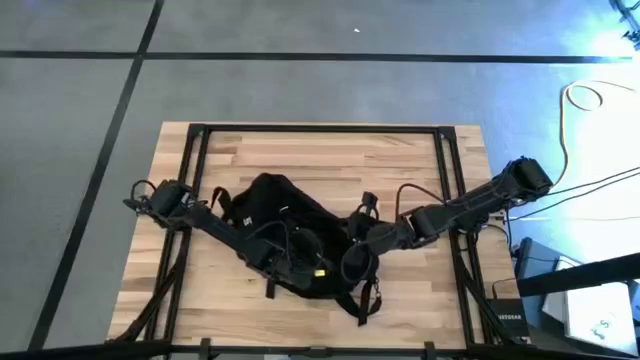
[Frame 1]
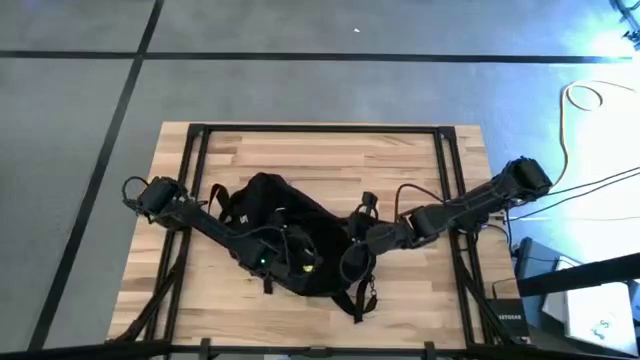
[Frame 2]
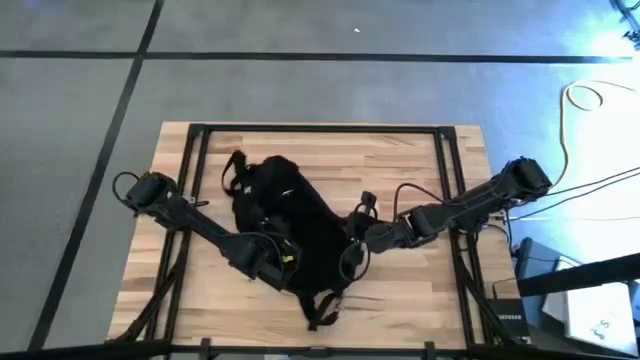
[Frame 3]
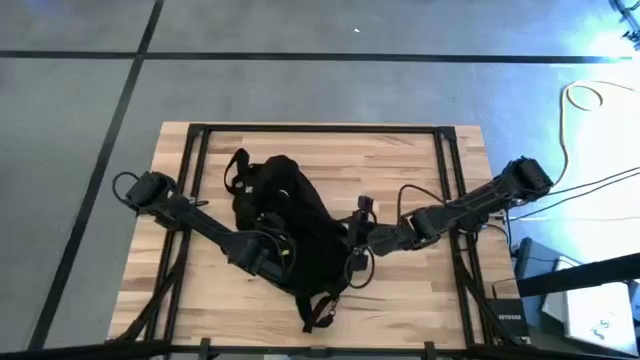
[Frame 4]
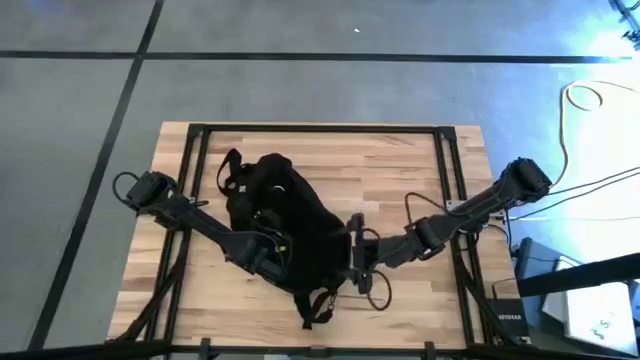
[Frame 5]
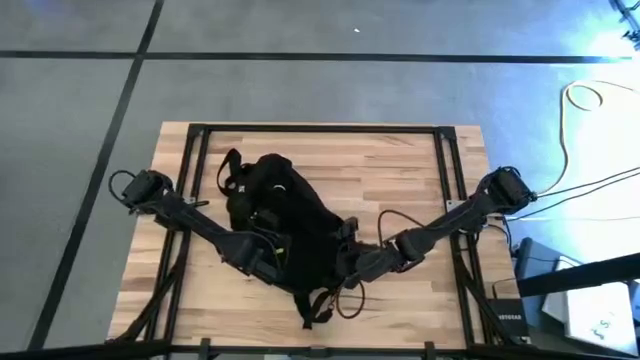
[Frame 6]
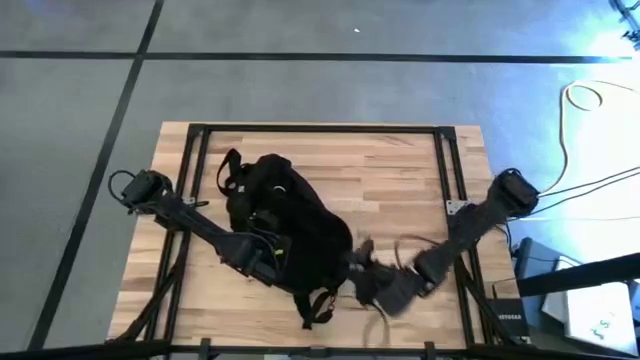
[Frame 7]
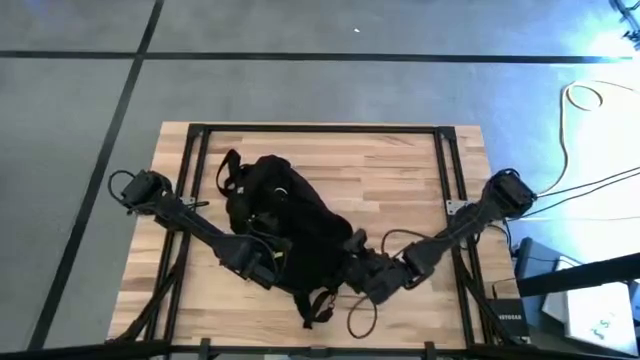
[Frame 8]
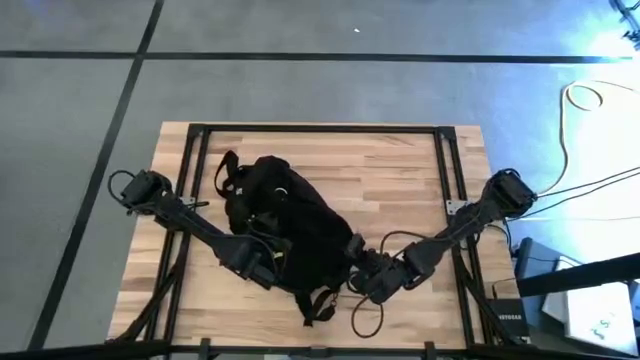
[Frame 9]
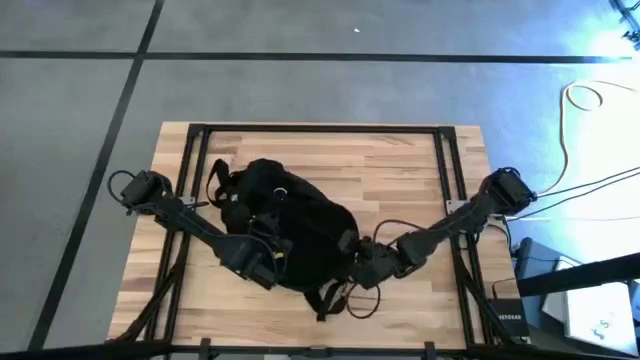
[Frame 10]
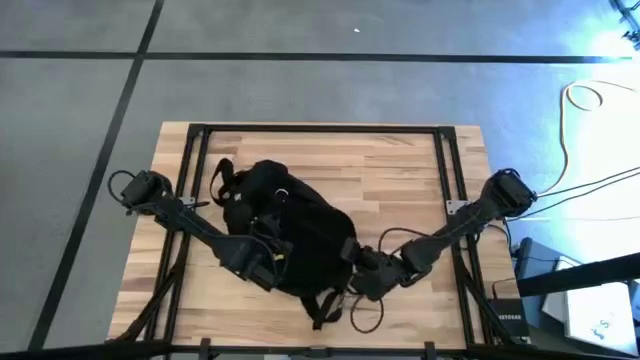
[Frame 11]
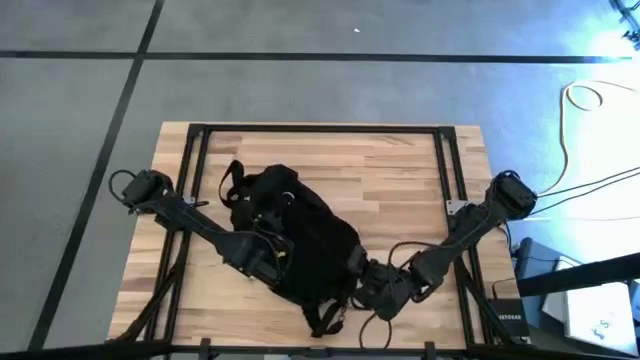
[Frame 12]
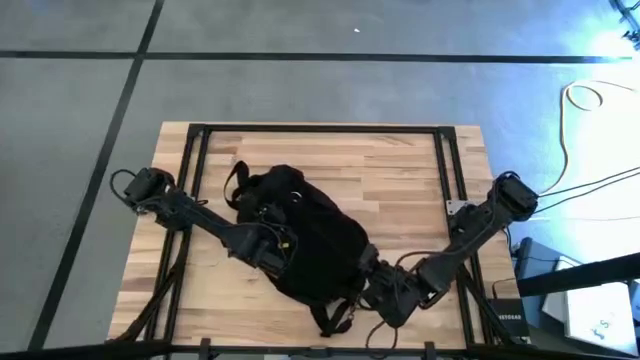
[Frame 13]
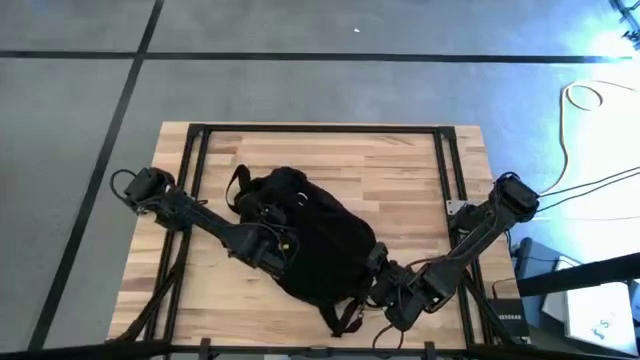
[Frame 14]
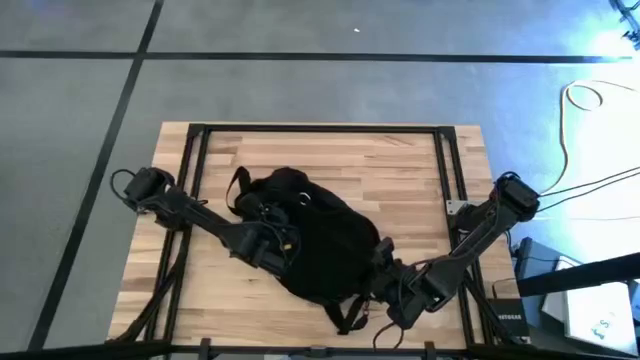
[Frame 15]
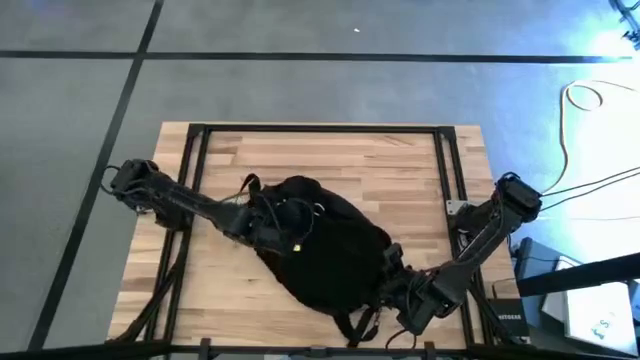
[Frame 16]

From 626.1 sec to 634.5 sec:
Task: Unpack backpack
Close the black backpack

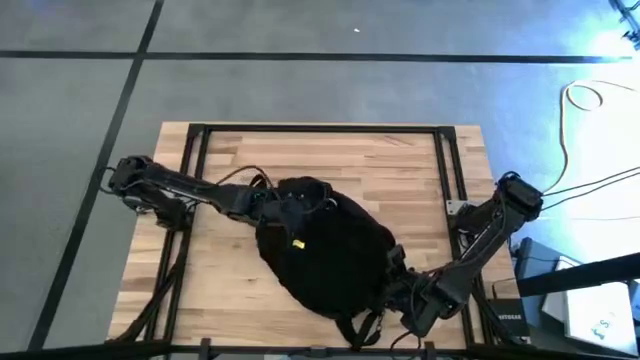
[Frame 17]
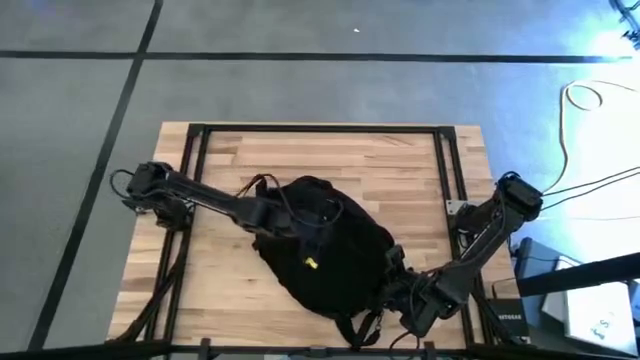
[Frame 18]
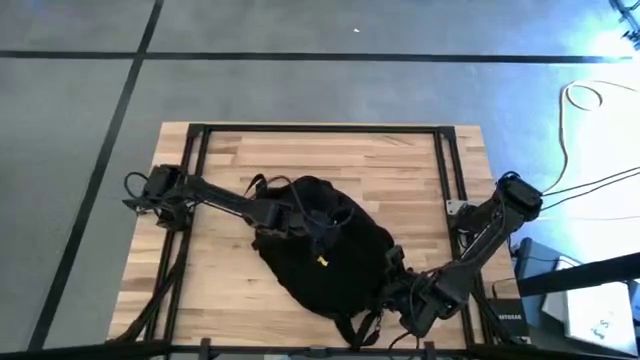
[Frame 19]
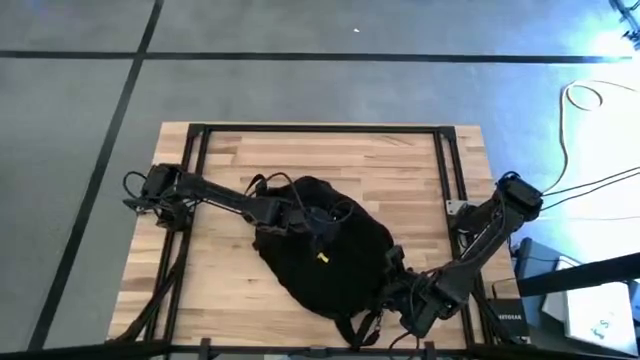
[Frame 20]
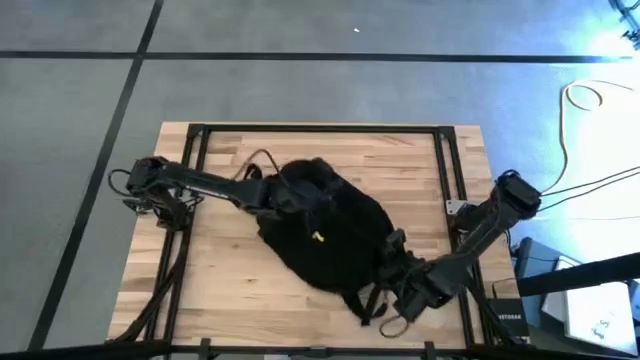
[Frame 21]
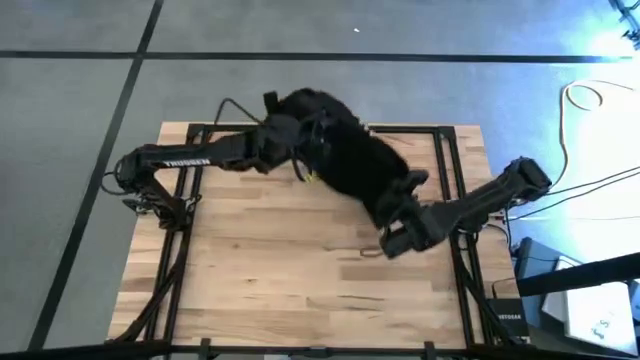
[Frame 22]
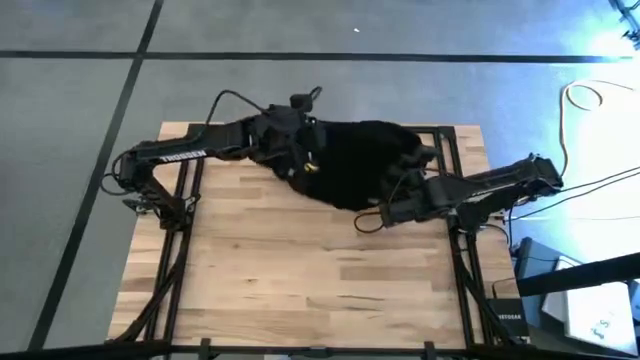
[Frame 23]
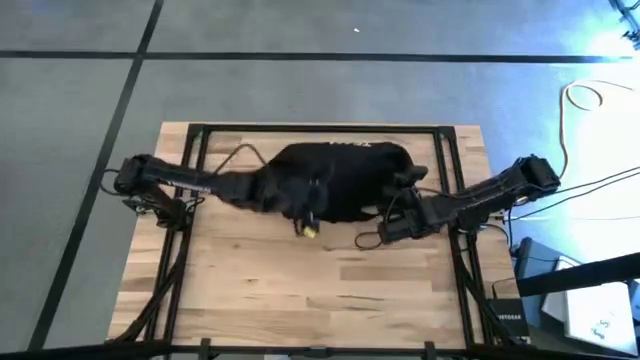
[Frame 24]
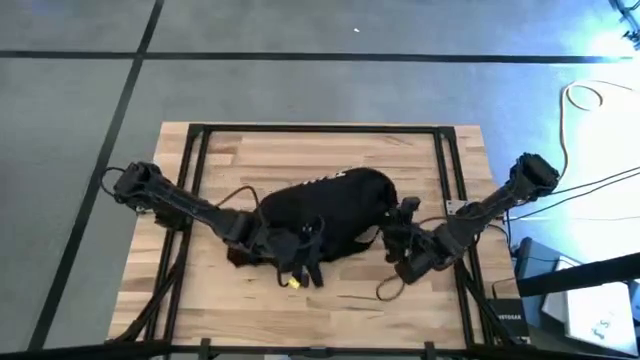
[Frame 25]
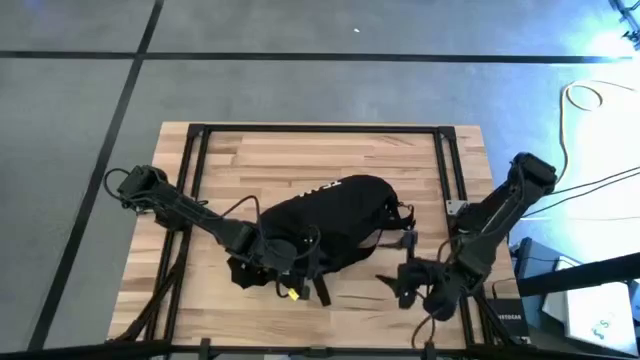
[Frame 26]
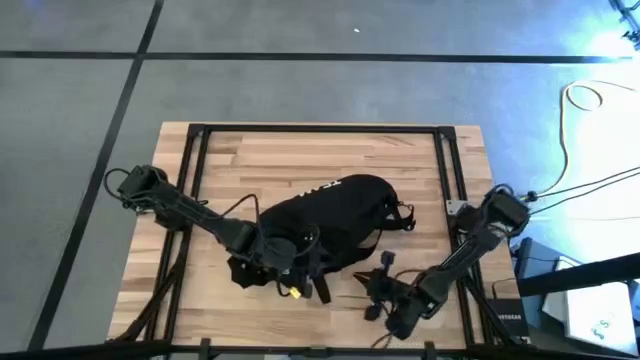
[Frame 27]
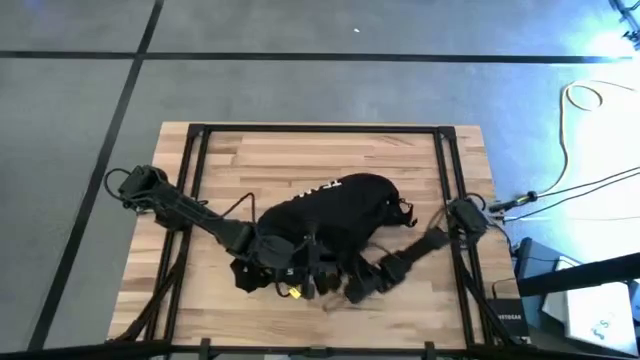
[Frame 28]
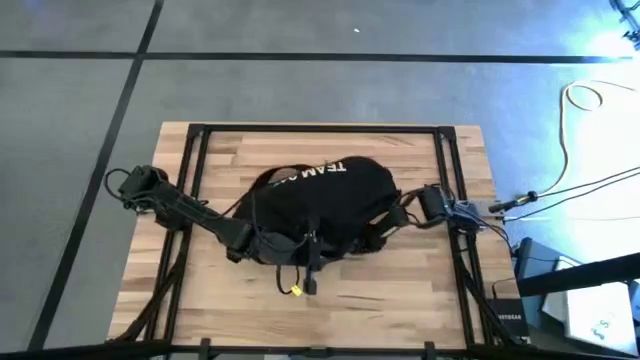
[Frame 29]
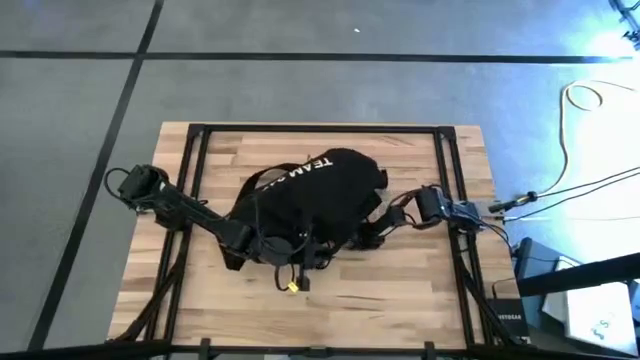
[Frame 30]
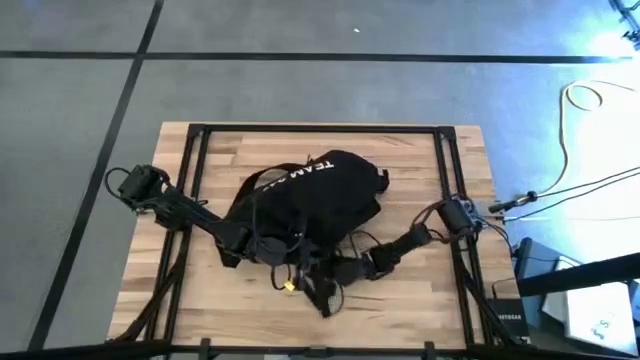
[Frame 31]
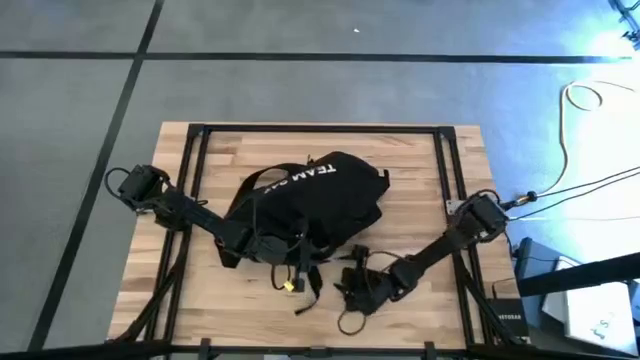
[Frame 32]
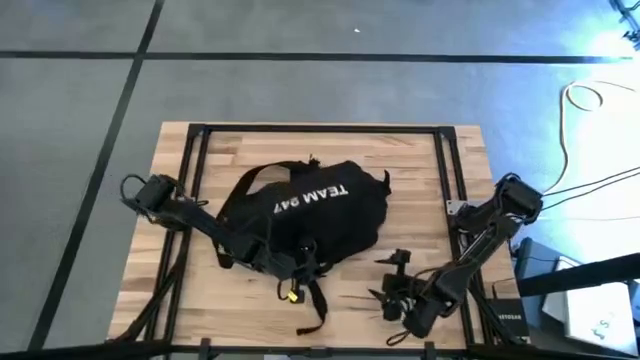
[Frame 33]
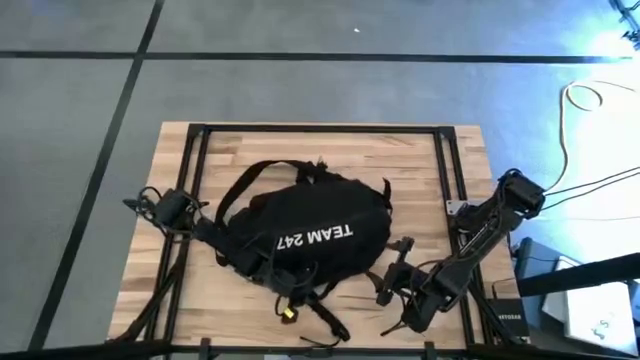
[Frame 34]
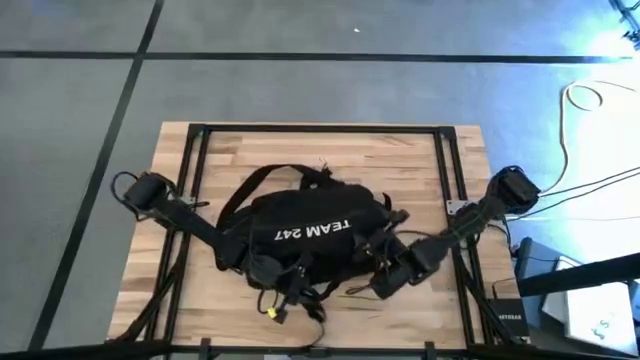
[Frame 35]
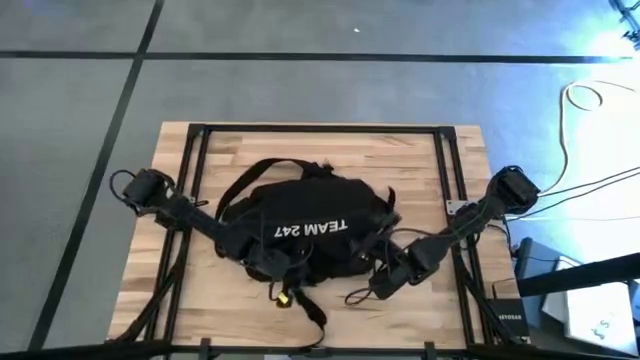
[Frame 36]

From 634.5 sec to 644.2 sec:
Move the black backpack to the center of the table

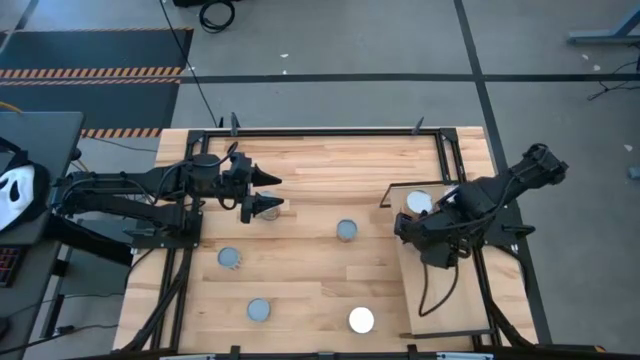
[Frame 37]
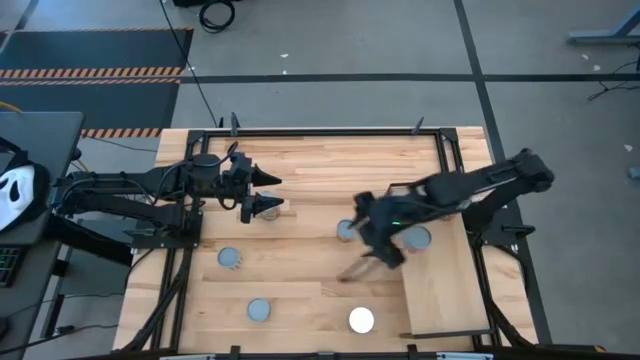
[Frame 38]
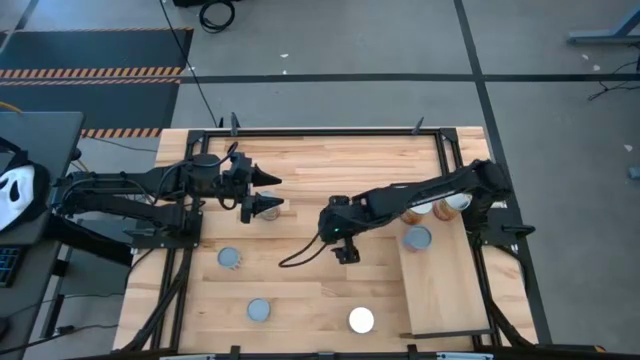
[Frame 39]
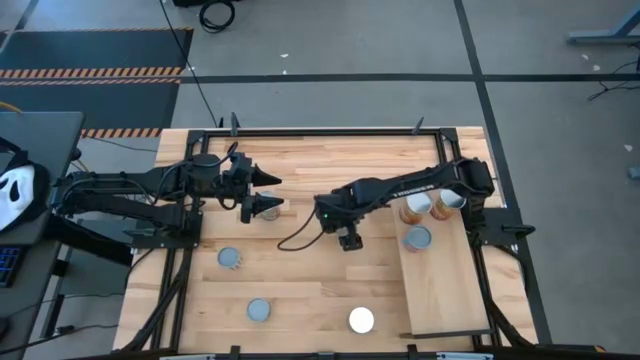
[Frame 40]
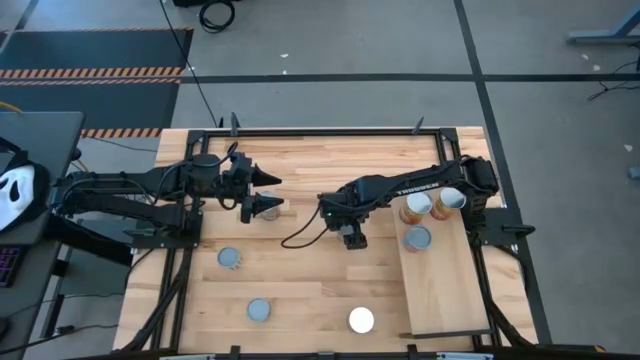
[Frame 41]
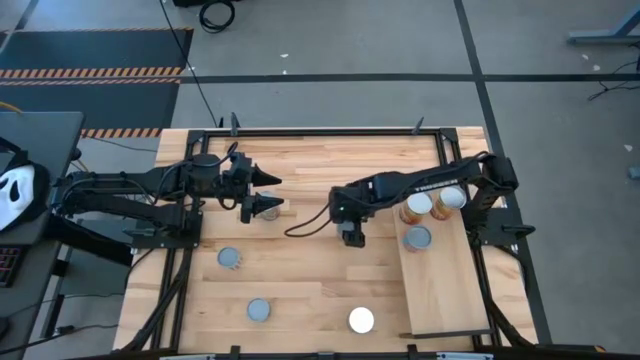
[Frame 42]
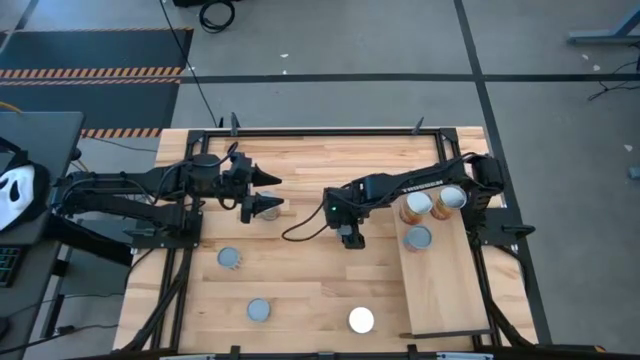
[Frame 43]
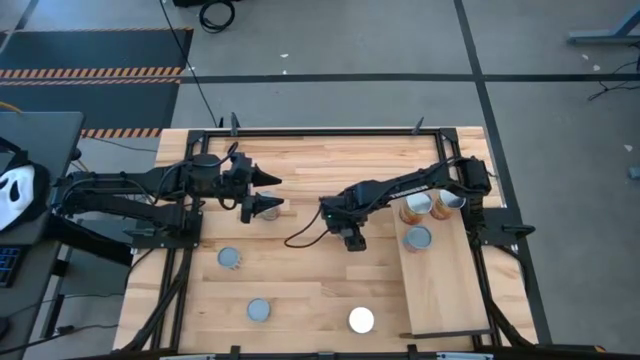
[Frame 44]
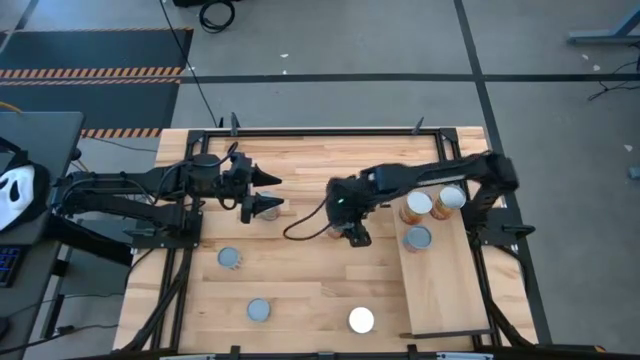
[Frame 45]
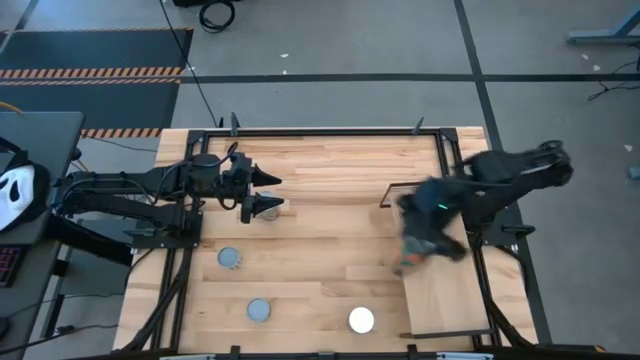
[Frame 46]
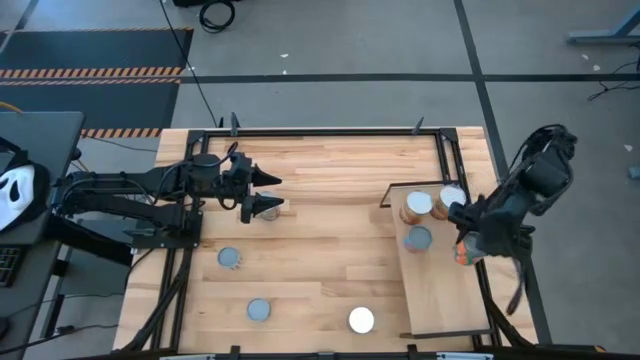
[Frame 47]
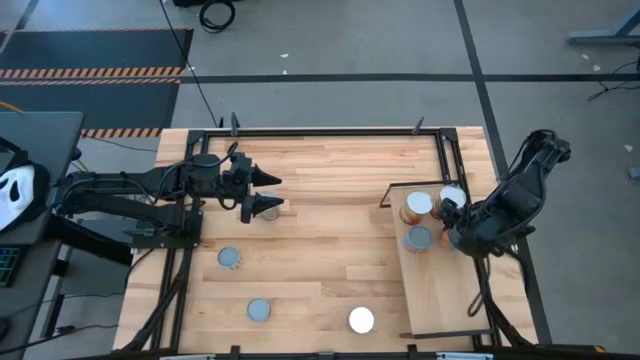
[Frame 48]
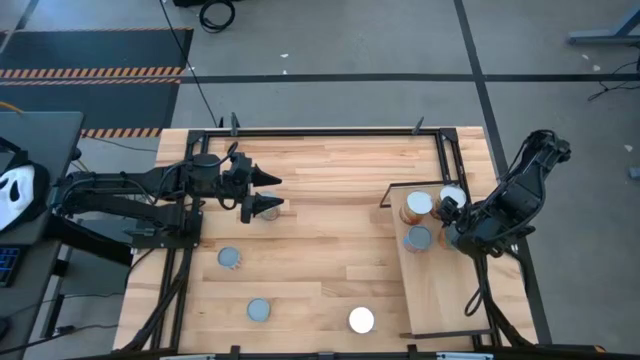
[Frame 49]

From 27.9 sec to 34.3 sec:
Task: Pick and place cans onto a shelf
Put the canned oranges on the shelf
